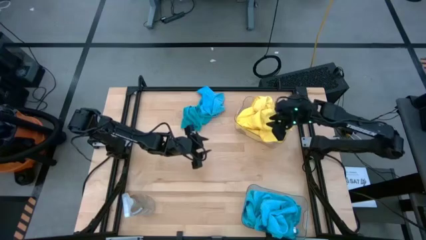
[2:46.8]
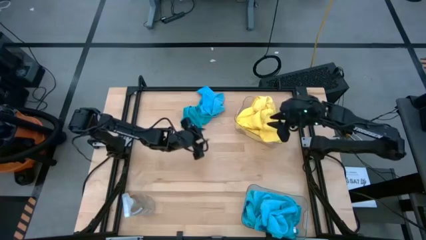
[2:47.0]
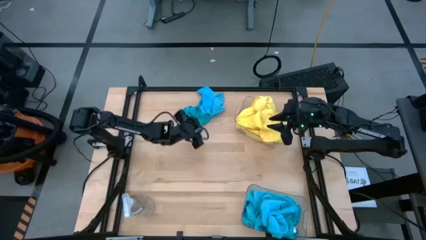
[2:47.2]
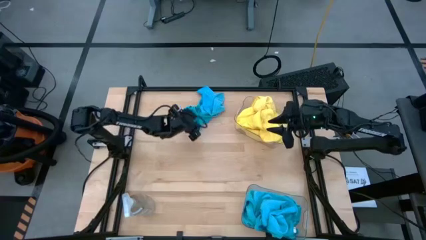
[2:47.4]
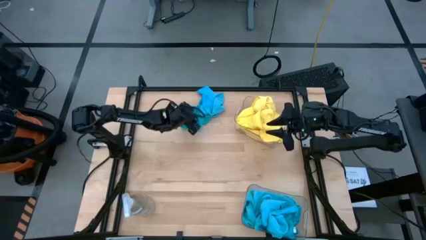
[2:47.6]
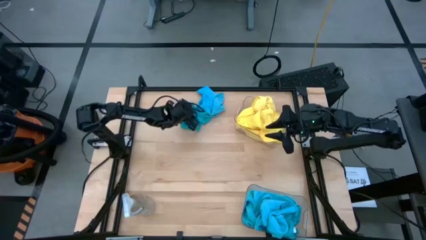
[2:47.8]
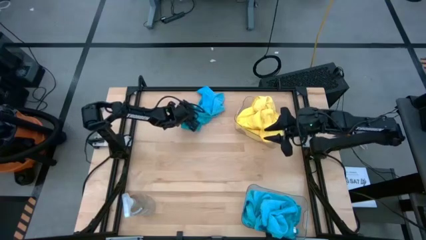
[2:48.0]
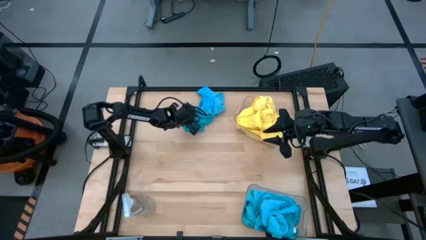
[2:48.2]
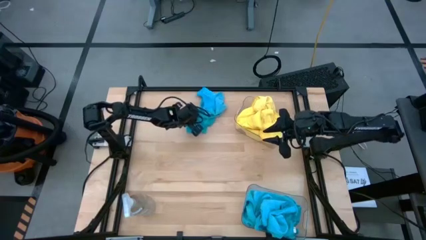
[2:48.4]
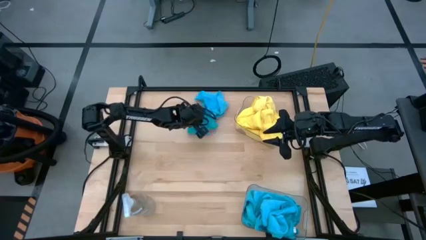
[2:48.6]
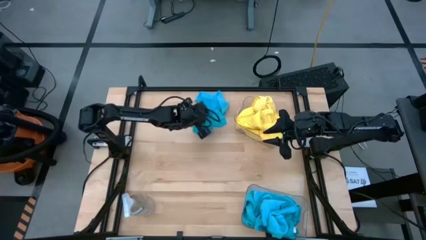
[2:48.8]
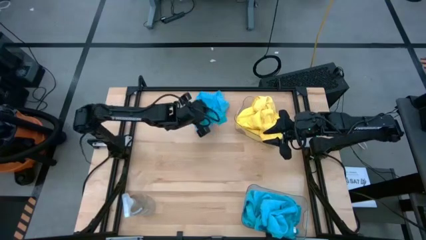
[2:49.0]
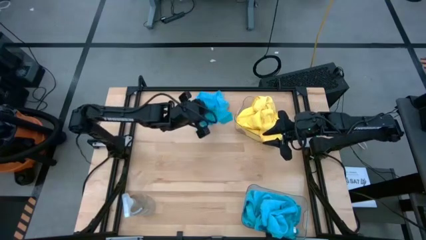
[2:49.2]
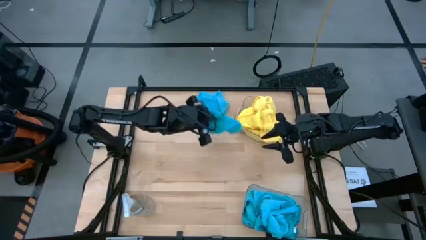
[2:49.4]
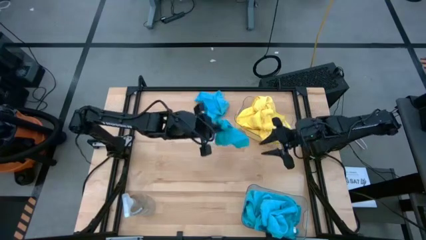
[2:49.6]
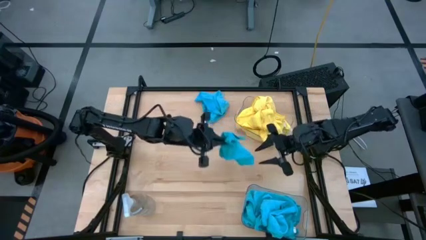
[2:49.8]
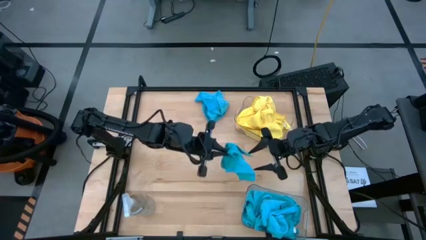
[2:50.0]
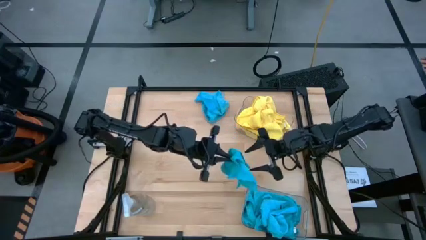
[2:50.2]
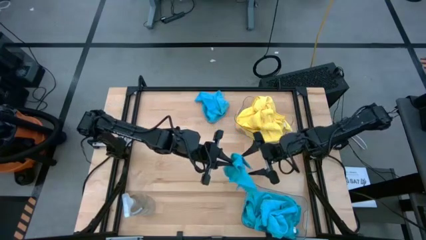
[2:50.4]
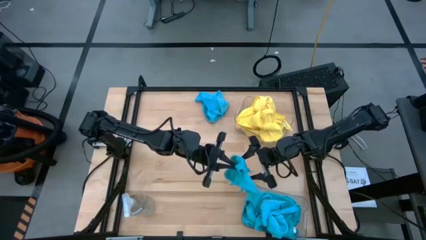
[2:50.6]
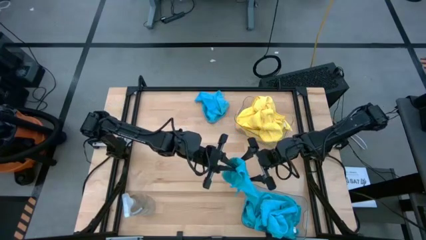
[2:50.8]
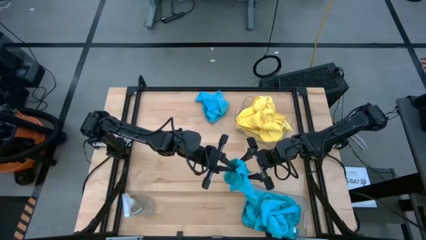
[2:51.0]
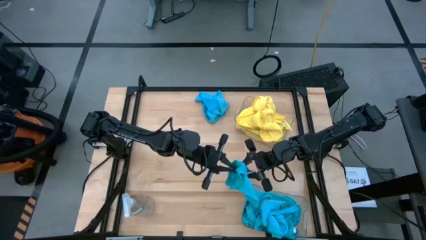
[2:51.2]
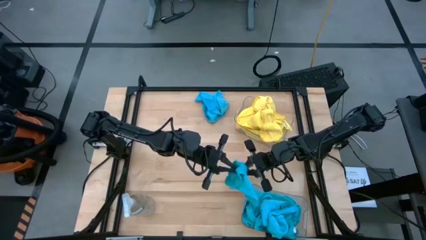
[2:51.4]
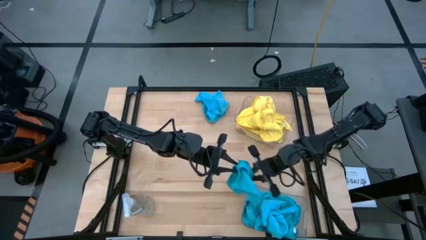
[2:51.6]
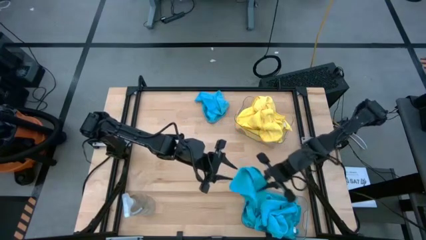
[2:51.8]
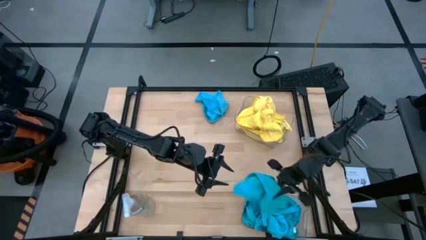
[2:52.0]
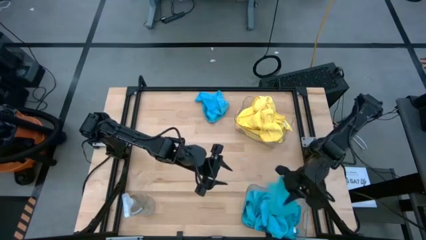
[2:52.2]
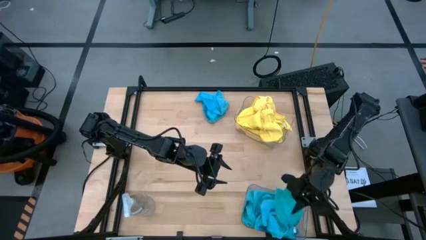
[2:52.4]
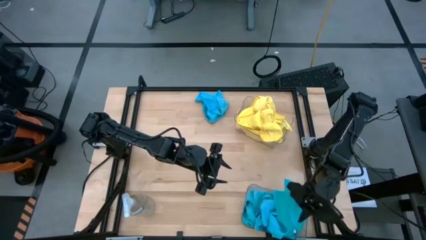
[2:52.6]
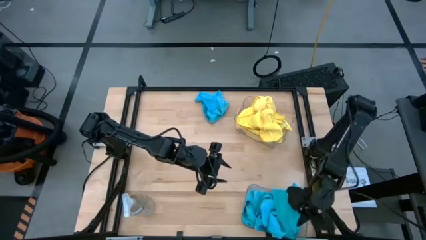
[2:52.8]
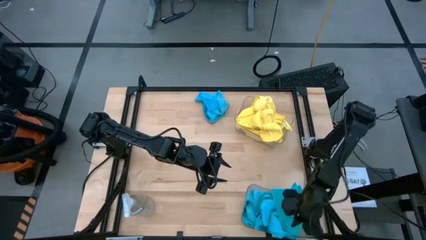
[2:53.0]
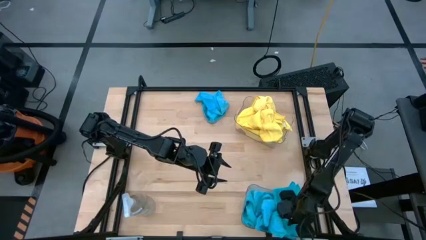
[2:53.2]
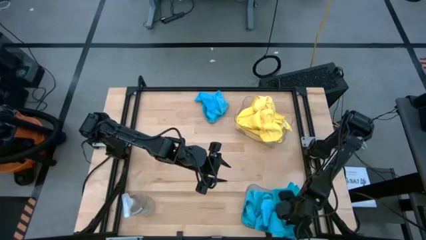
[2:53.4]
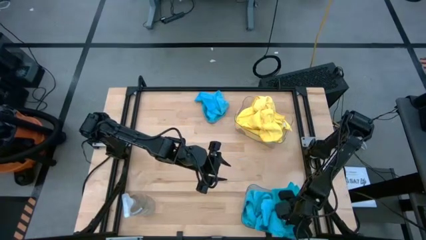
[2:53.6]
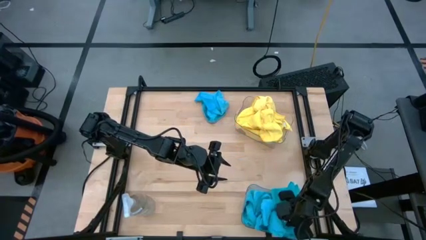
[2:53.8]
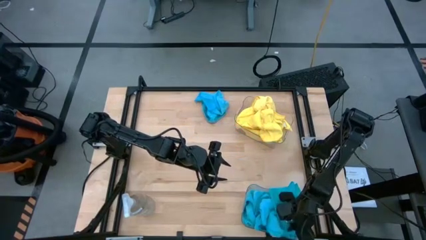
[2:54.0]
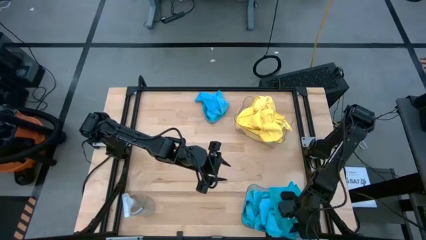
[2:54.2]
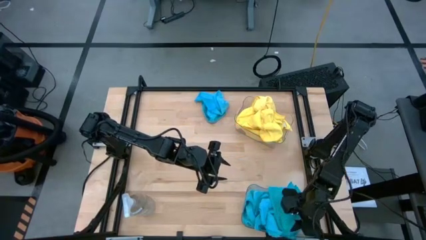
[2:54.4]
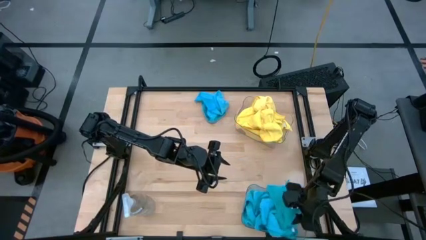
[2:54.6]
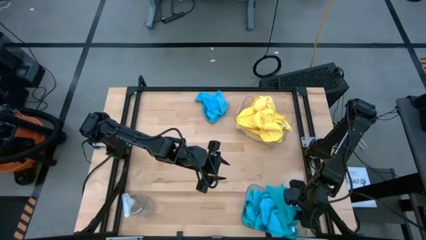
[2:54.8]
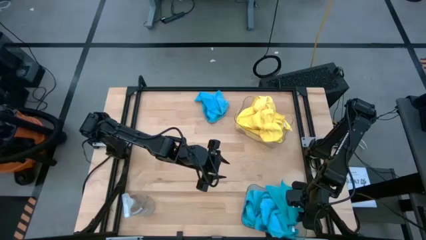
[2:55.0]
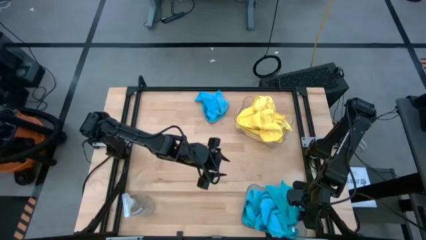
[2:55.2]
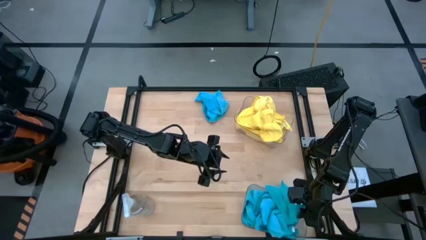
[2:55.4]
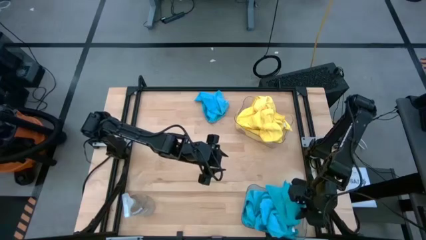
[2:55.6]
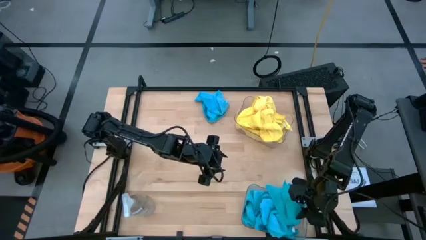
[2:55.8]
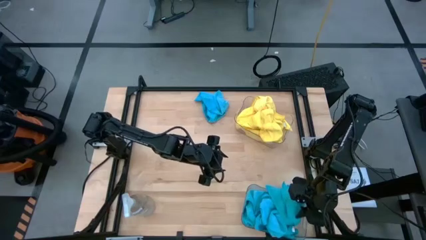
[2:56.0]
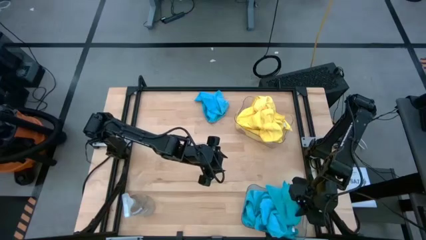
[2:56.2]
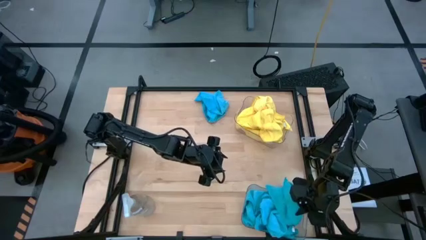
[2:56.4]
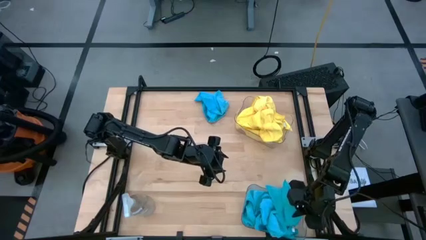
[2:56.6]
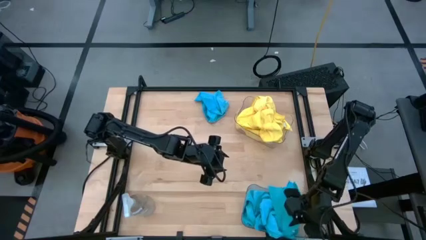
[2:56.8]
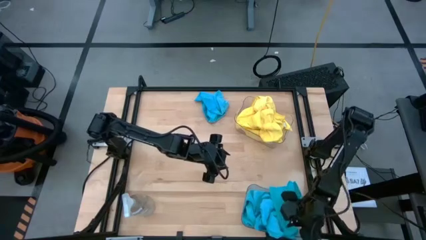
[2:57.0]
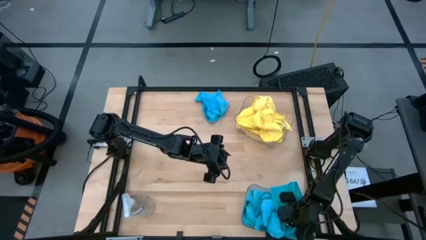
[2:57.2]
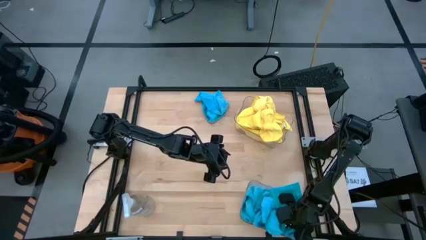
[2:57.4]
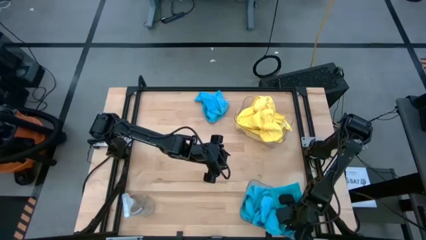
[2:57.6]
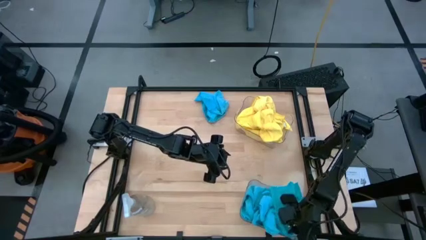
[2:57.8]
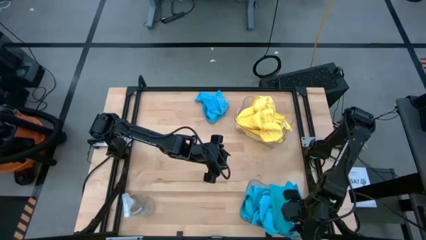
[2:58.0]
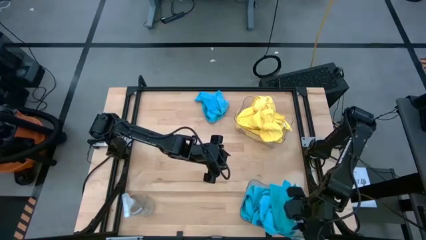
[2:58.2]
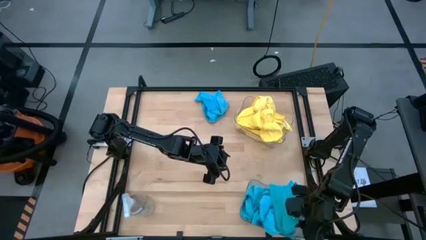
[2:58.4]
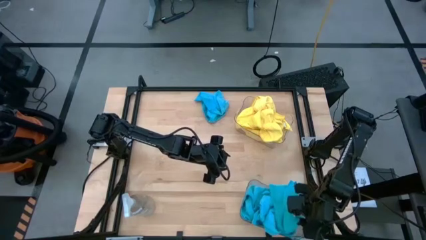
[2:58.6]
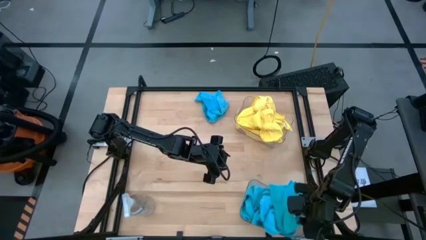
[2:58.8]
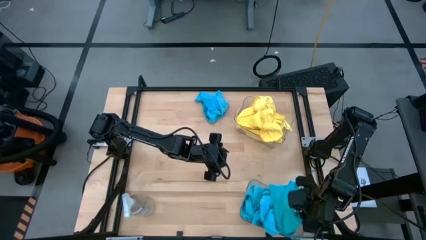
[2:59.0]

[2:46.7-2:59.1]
Task: Sort microfiber towel by color & place in baskets
Put the blue microfiber cloth into the bottom transparent bin
